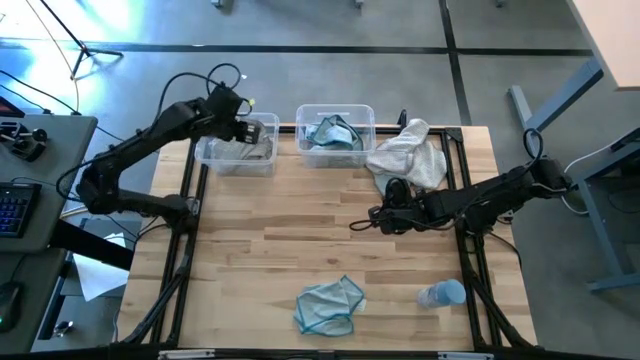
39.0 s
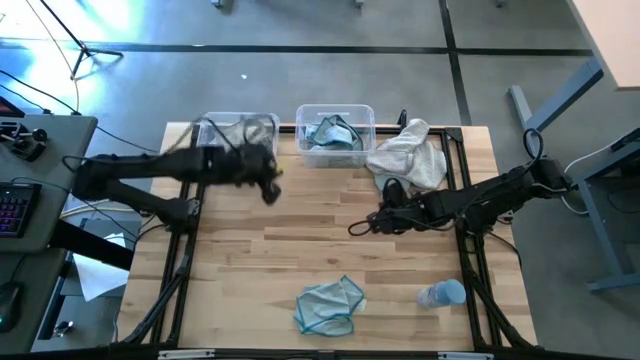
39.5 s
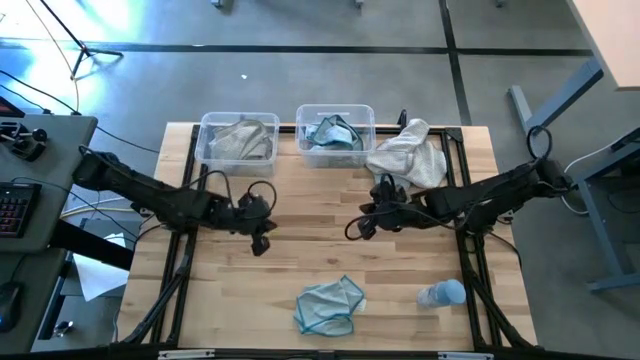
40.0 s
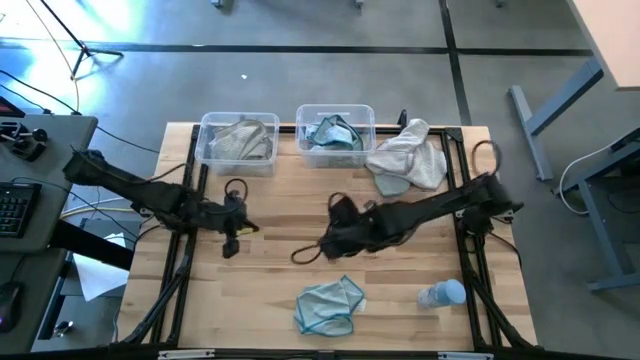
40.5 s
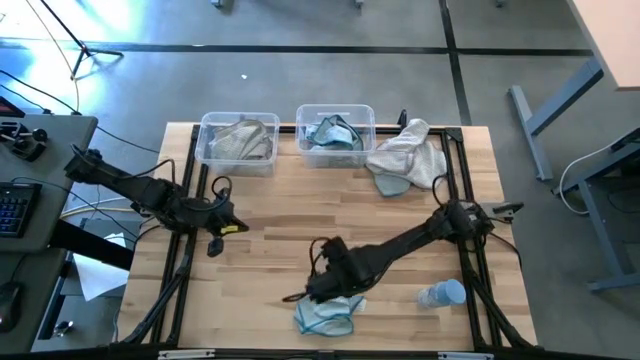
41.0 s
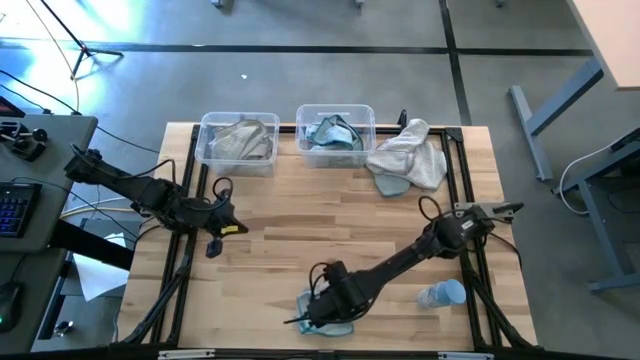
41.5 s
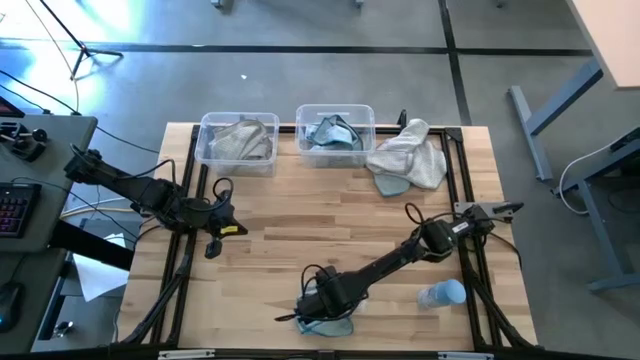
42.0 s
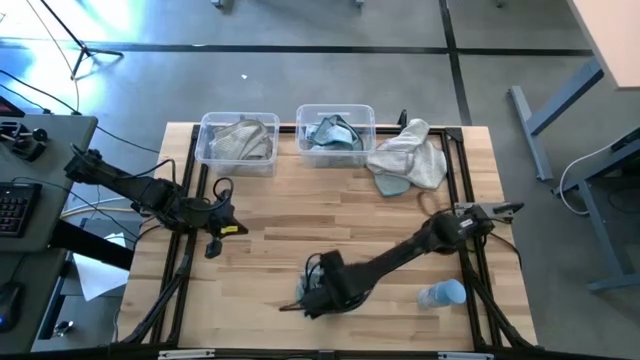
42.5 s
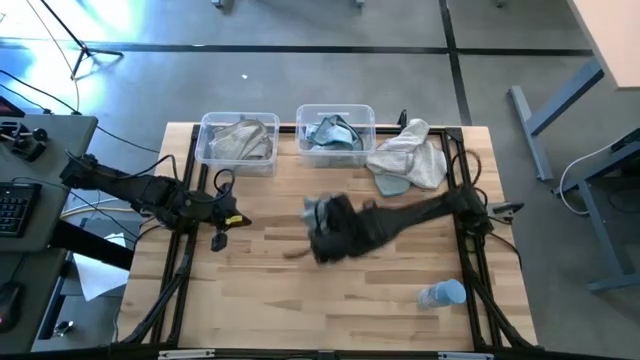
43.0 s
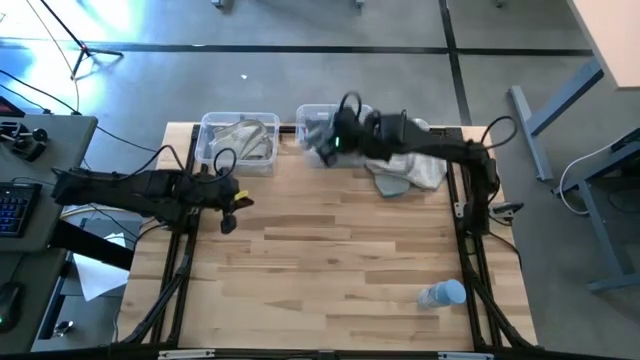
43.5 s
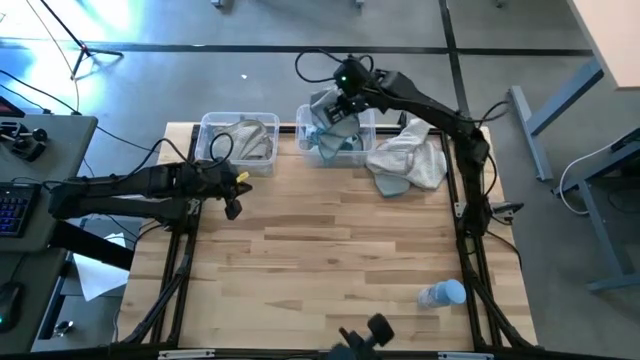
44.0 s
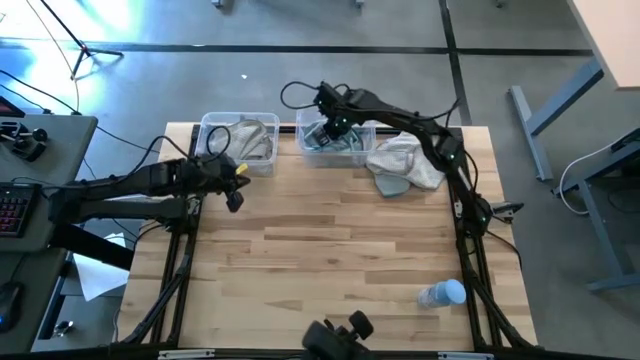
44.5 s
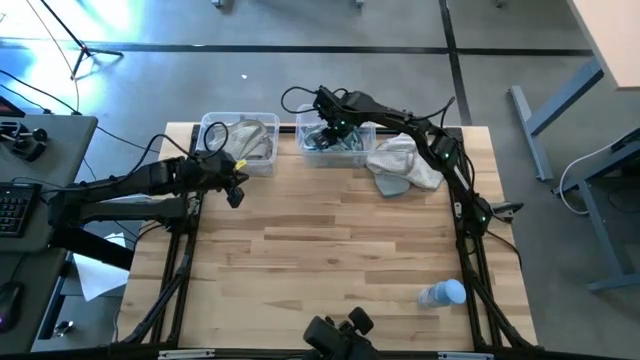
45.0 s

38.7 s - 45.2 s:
Task: Sort microfiber towel by color & place in baskets
Put the bottom blue towel into the right transparent bin

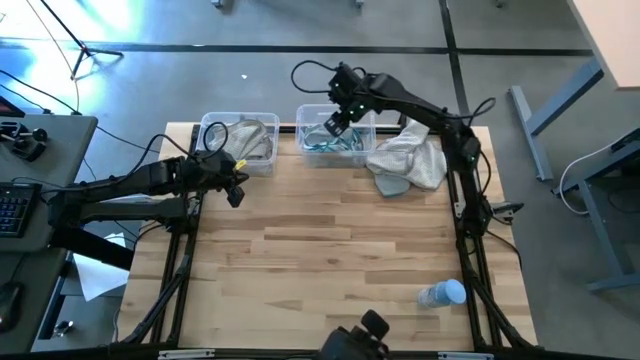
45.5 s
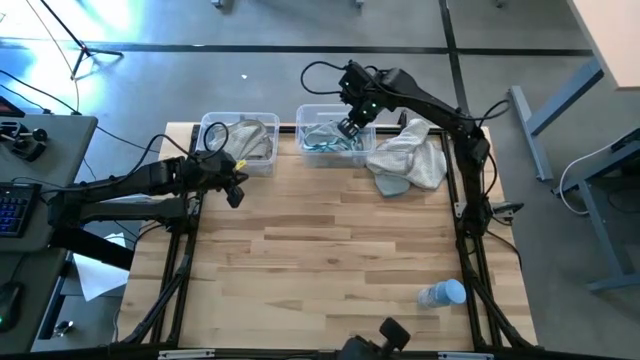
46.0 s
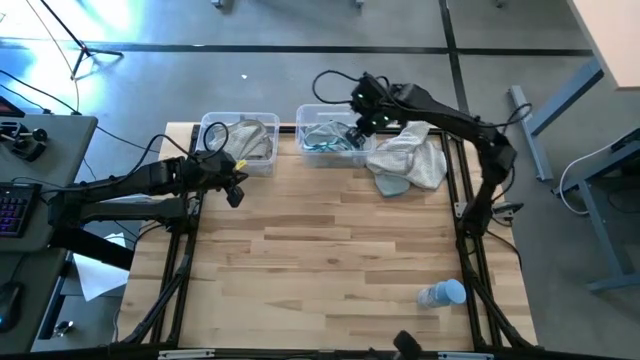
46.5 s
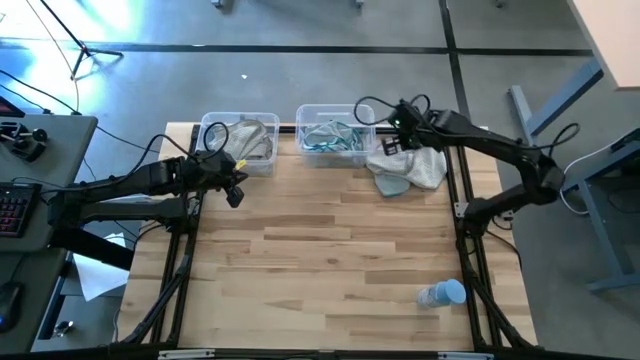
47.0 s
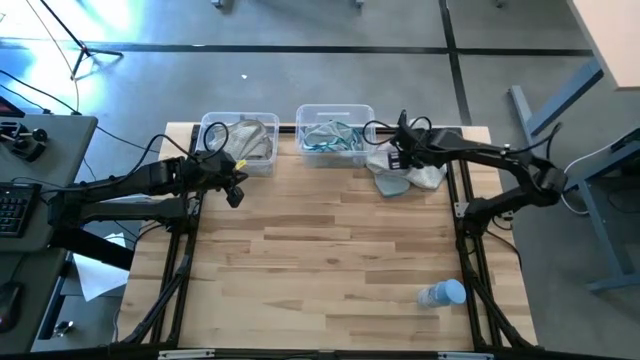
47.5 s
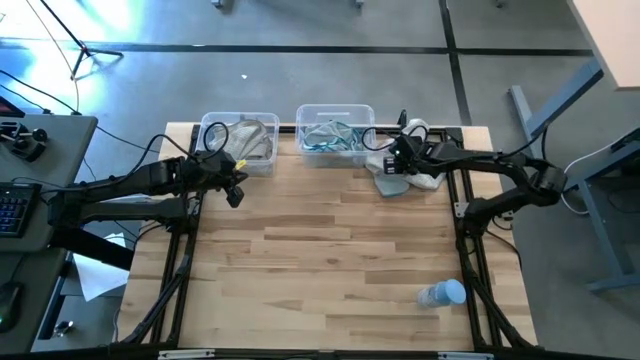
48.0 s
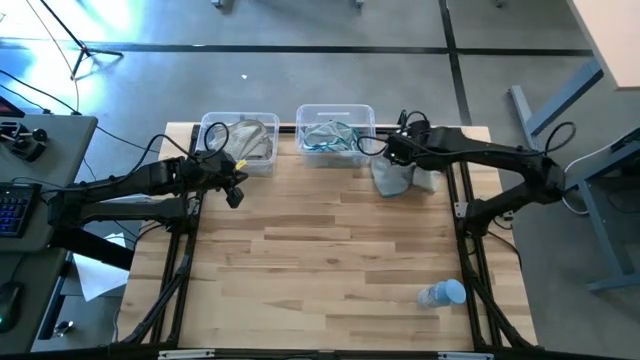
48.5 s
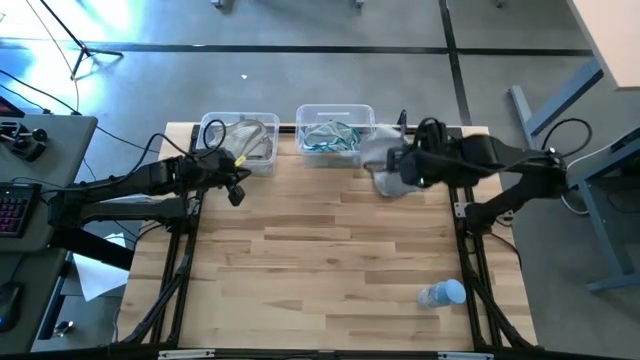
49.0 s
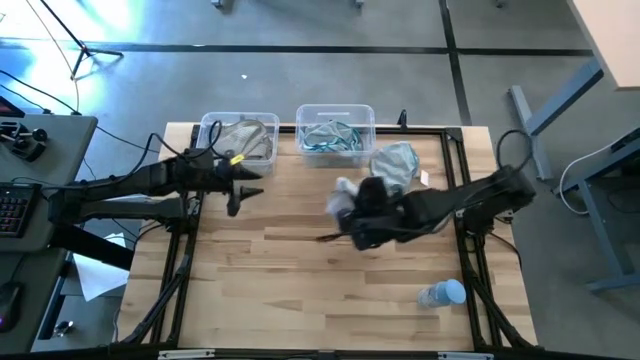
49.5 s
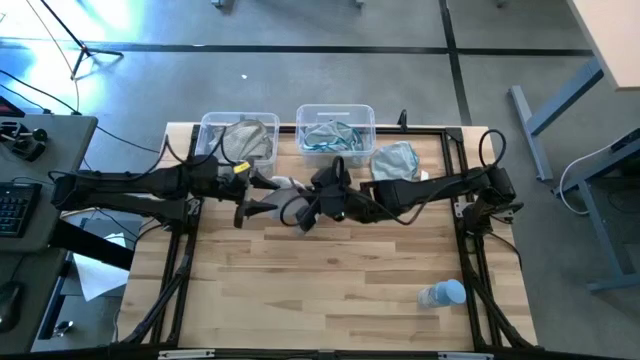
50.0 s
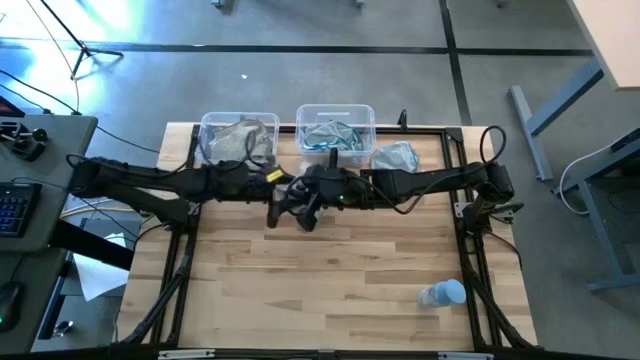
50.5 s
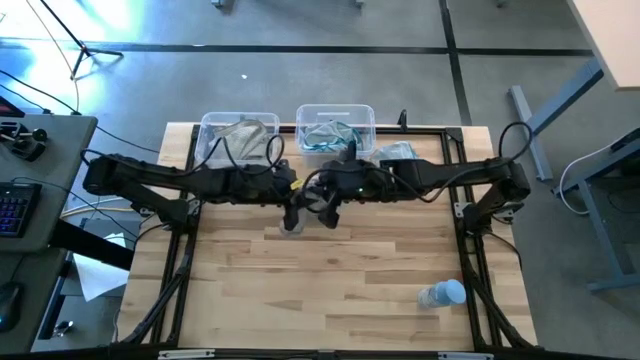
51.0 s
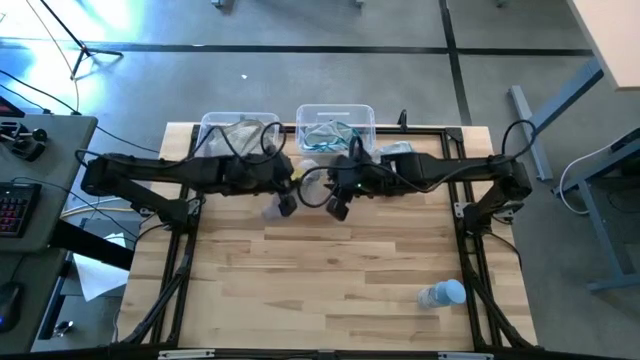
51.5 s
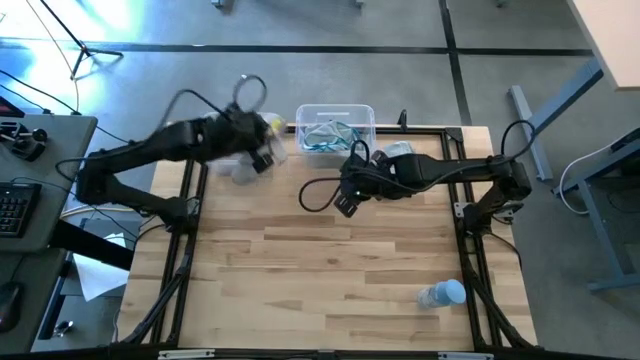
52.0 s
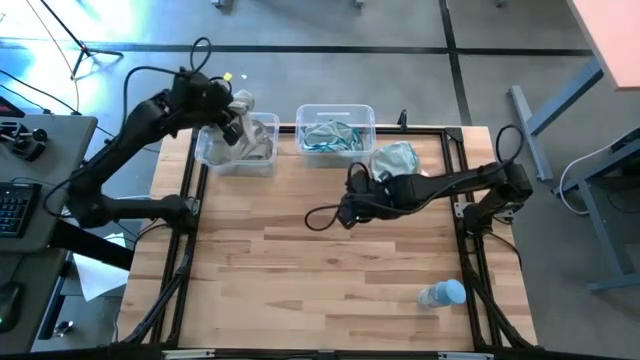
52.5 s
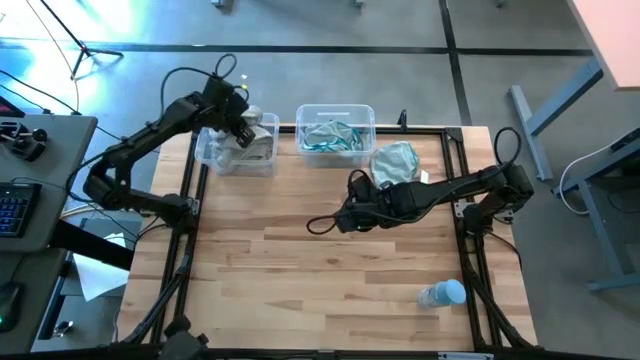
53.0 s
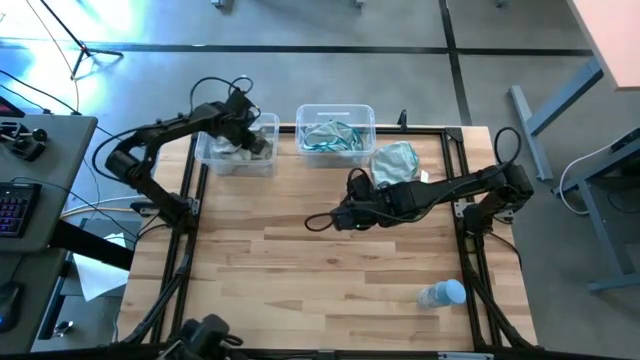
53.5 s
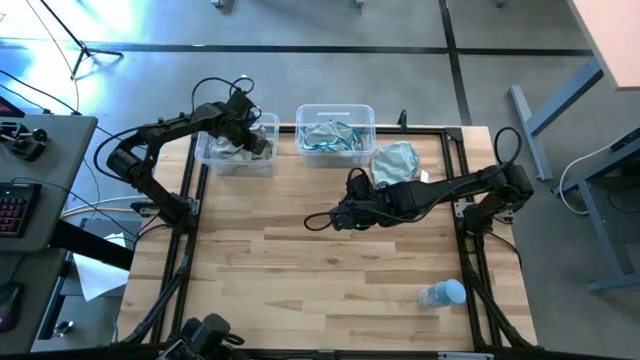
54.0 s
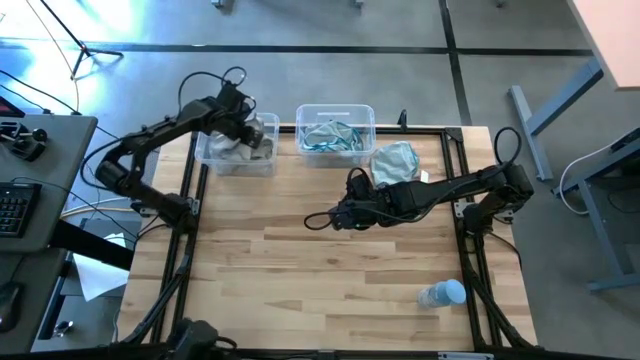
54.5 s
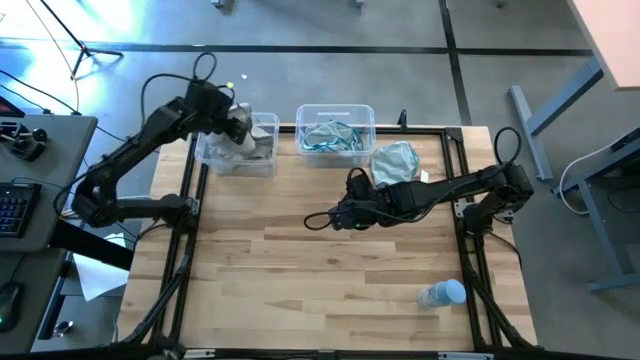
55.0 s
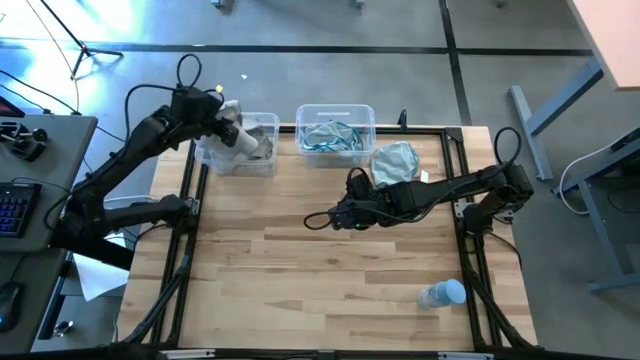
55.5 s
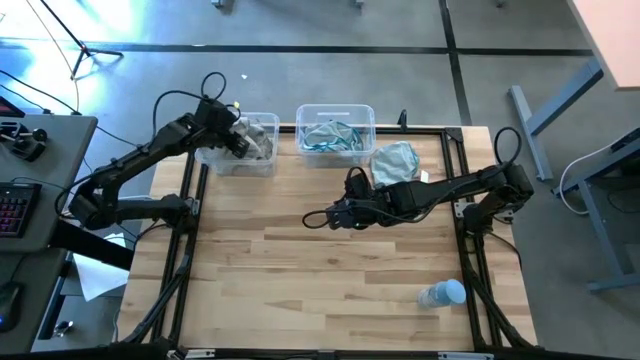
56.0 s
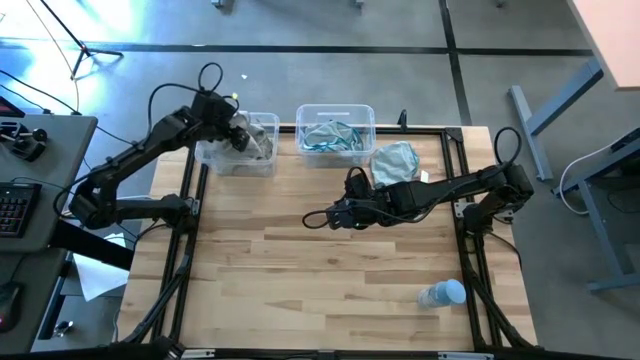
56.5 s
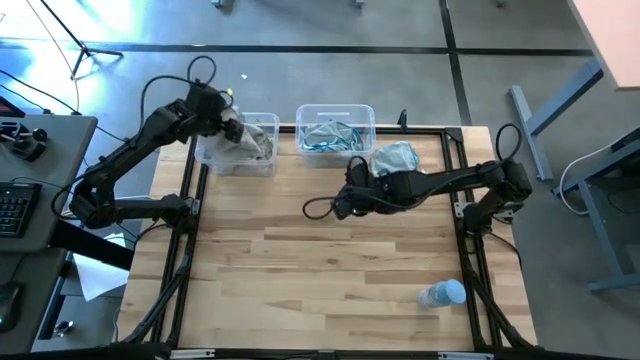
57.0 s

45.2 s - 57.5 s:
Put the gray towel into the left transparent bin

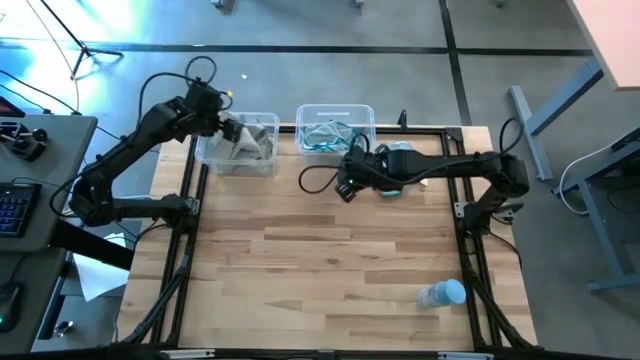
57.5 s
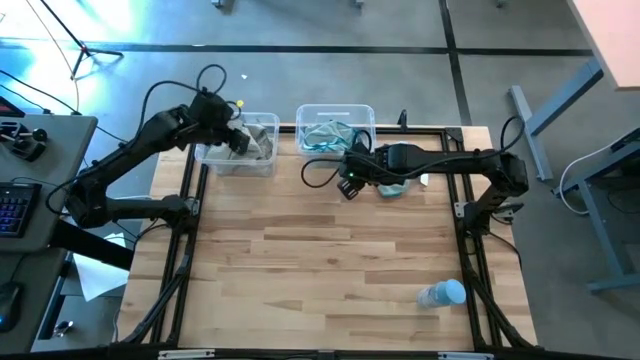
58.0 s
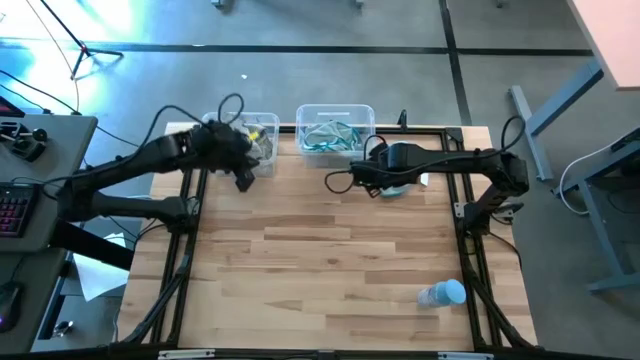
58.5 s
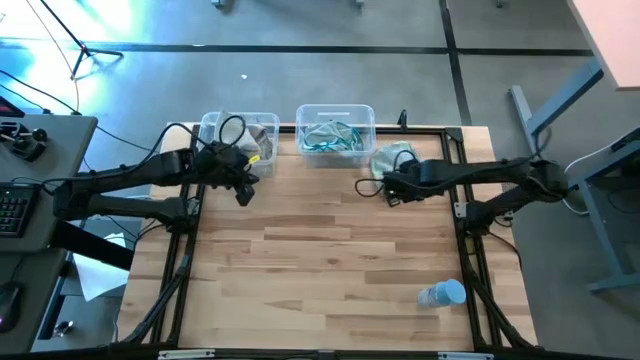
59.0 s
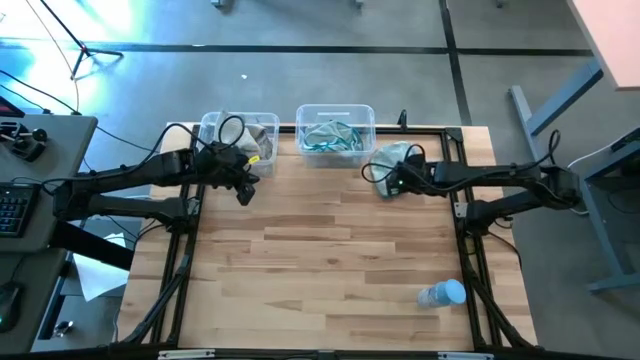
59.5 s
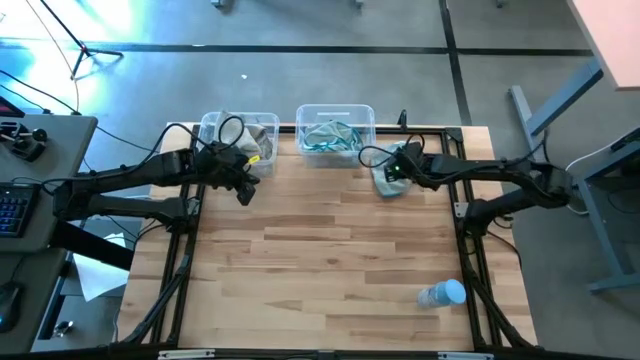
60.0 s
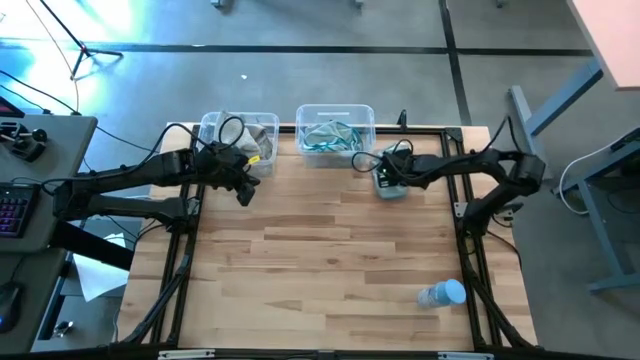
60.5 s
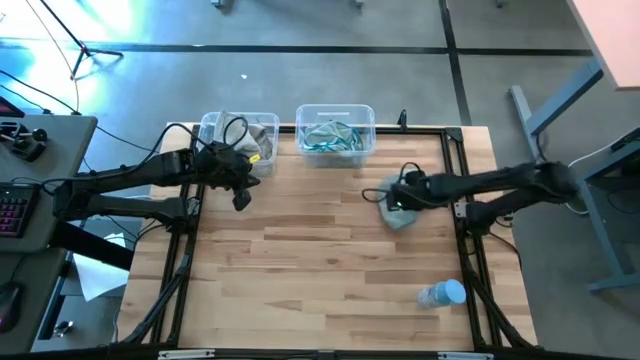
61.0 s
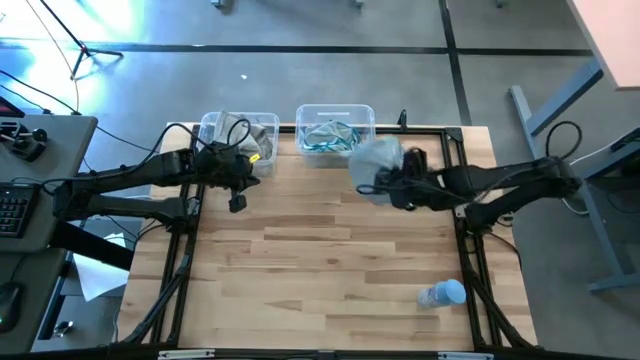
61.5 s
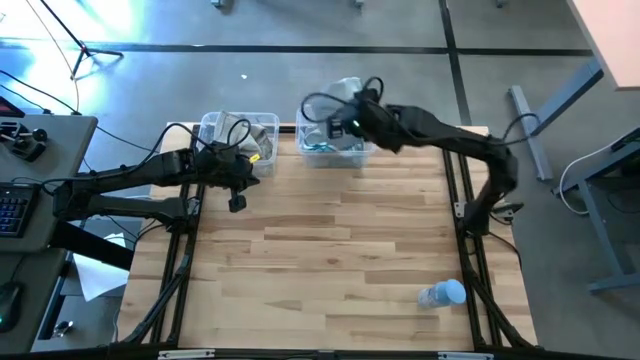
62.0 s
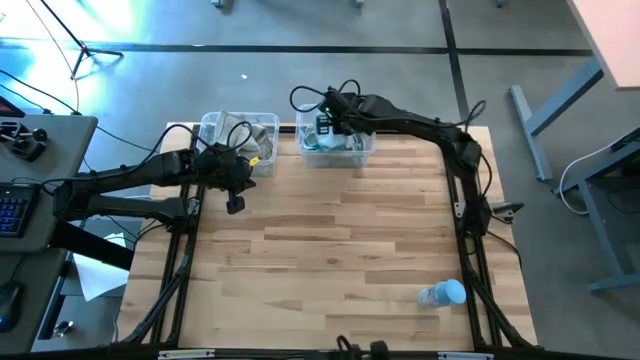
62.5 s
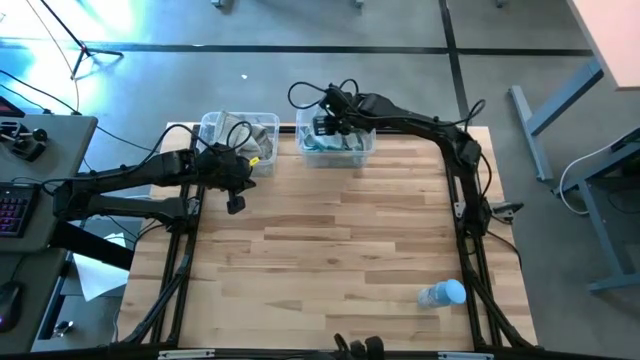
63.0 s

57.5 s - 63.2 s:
Put the blue towel into the right transparent bin
